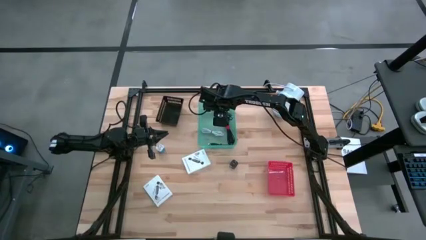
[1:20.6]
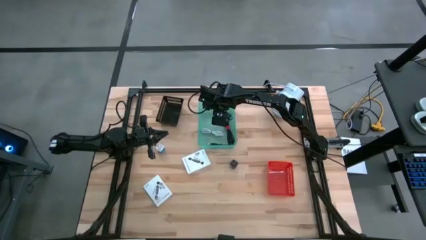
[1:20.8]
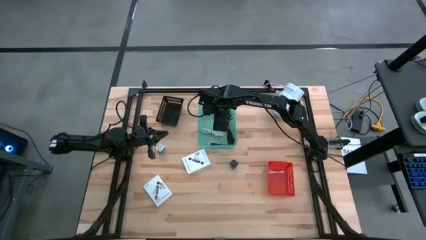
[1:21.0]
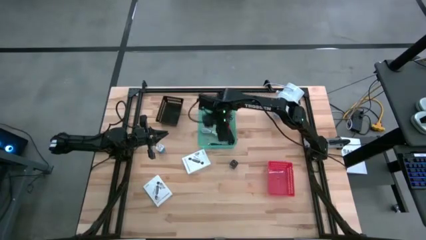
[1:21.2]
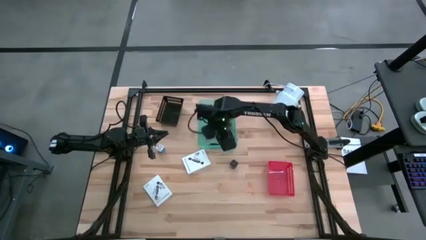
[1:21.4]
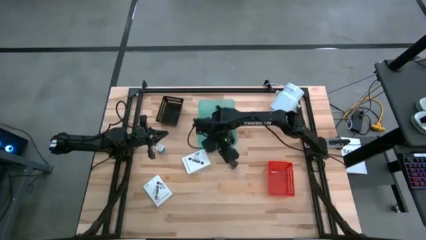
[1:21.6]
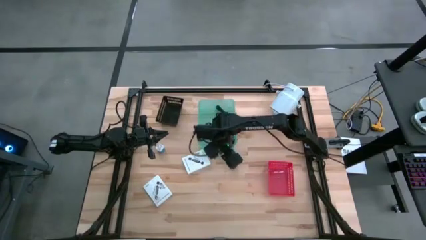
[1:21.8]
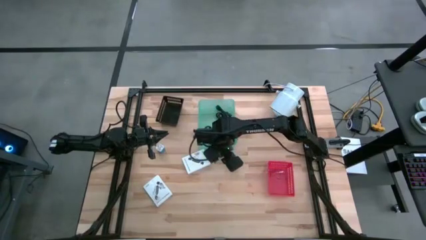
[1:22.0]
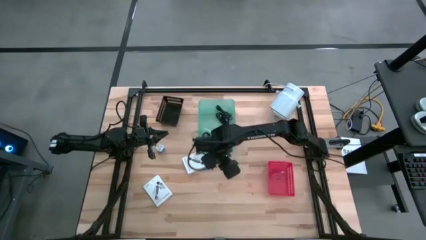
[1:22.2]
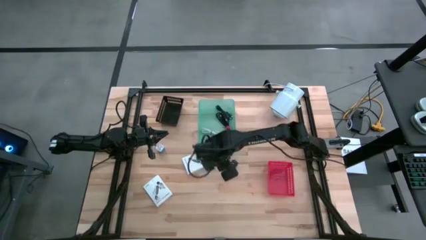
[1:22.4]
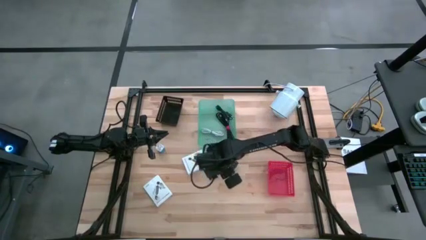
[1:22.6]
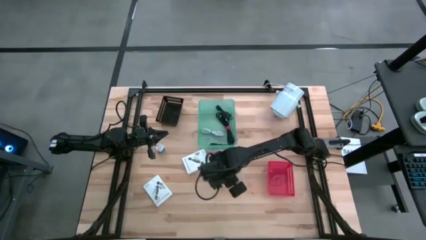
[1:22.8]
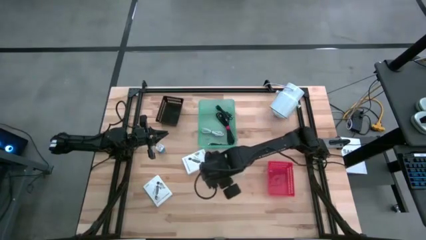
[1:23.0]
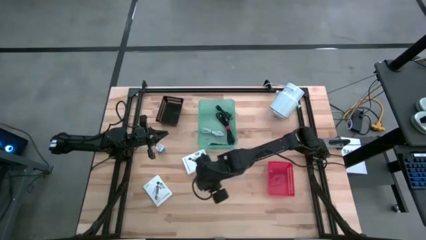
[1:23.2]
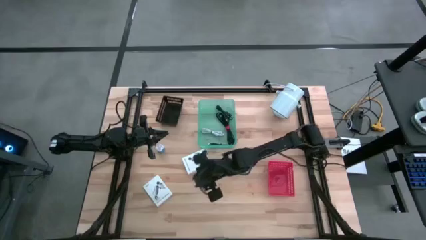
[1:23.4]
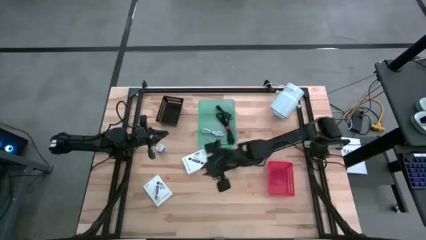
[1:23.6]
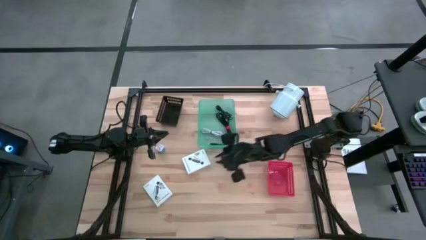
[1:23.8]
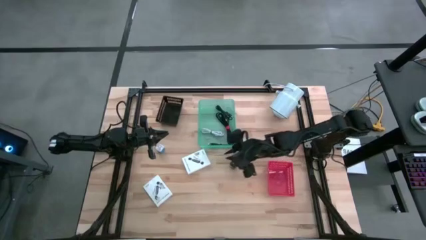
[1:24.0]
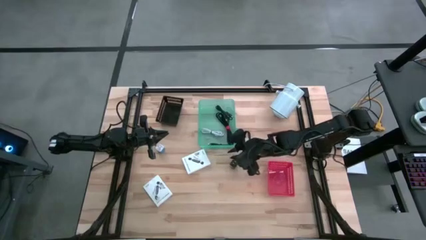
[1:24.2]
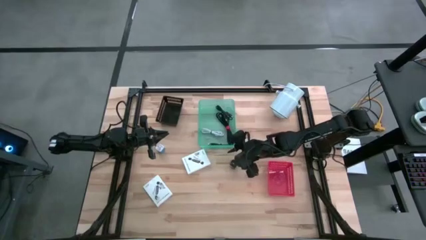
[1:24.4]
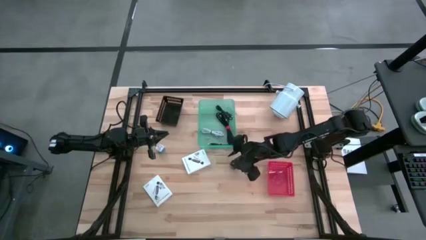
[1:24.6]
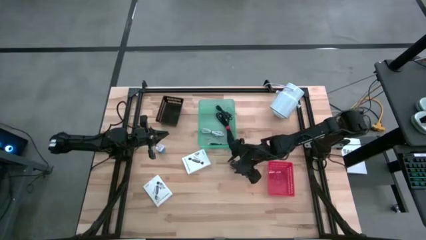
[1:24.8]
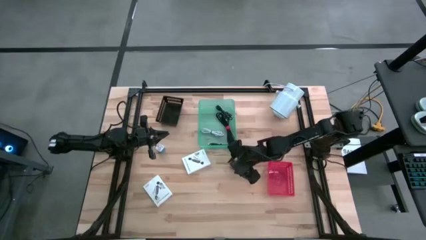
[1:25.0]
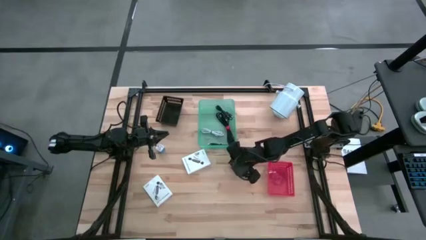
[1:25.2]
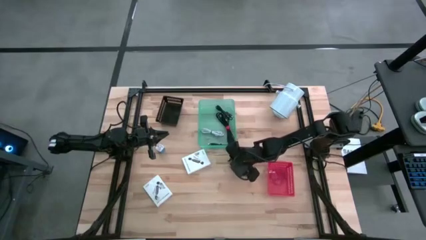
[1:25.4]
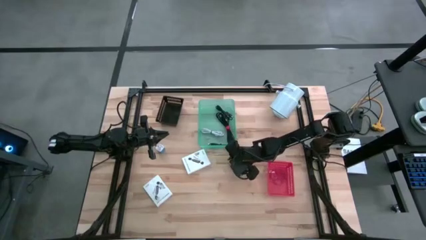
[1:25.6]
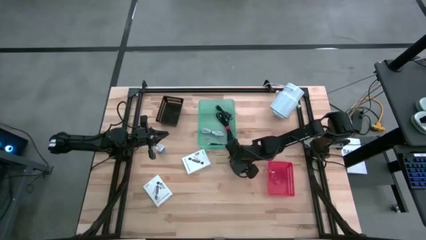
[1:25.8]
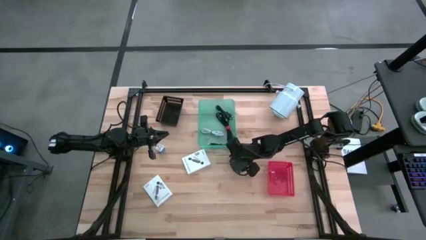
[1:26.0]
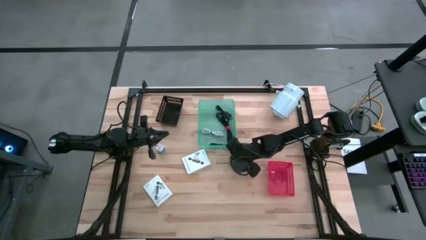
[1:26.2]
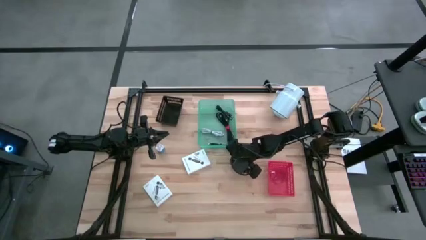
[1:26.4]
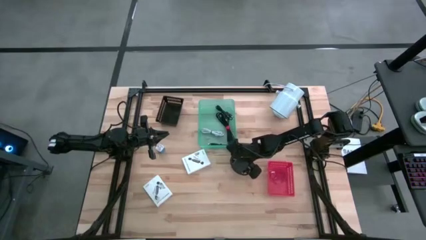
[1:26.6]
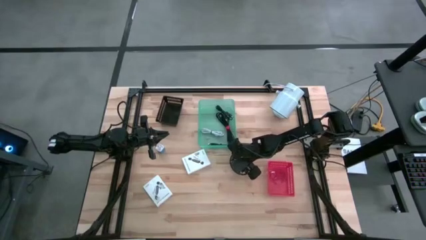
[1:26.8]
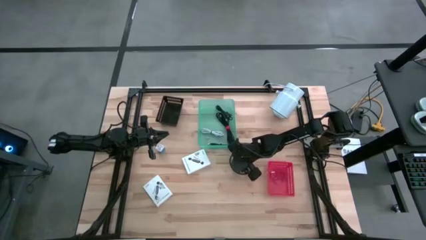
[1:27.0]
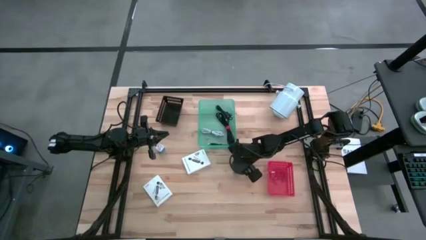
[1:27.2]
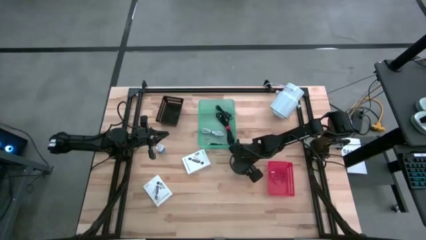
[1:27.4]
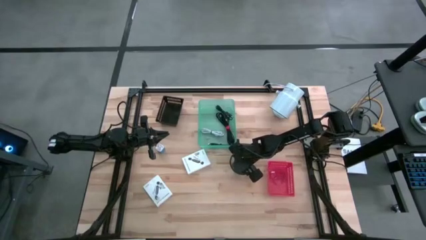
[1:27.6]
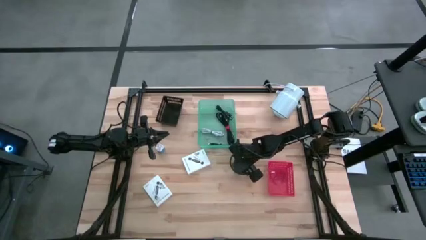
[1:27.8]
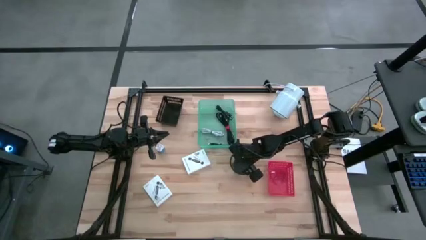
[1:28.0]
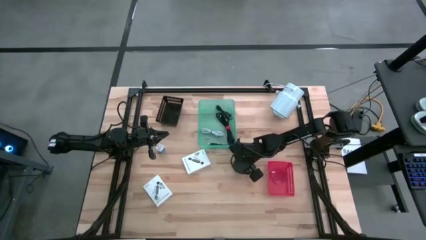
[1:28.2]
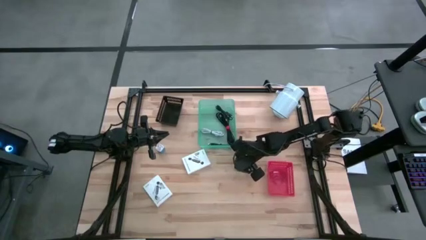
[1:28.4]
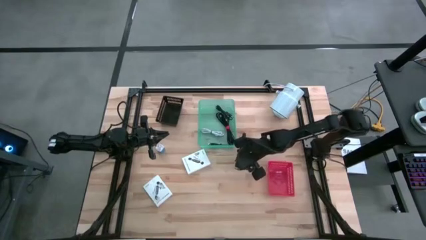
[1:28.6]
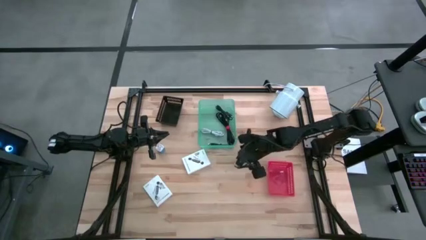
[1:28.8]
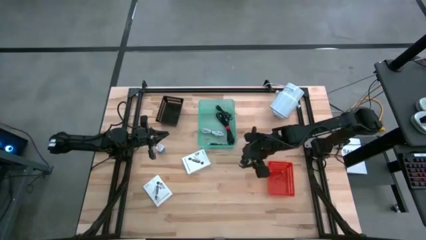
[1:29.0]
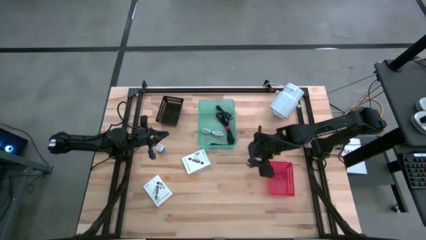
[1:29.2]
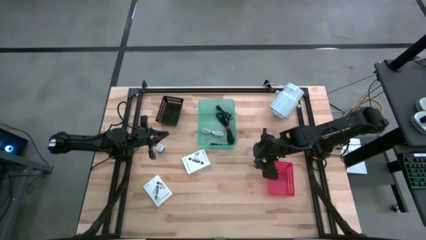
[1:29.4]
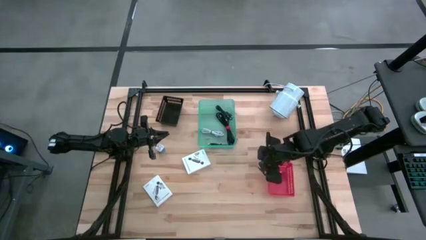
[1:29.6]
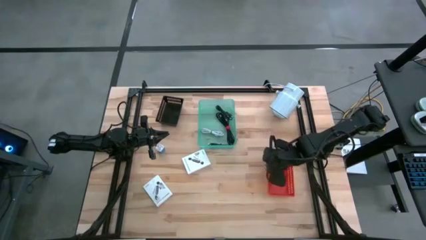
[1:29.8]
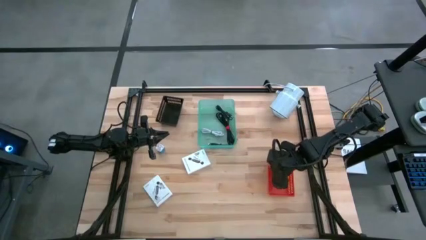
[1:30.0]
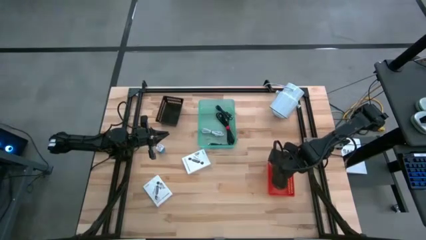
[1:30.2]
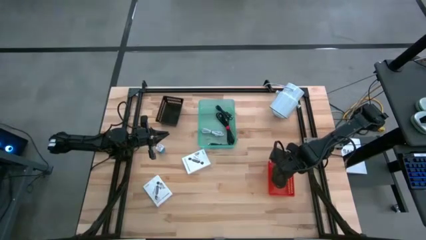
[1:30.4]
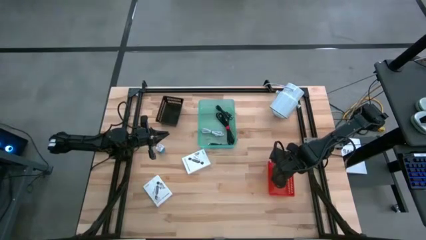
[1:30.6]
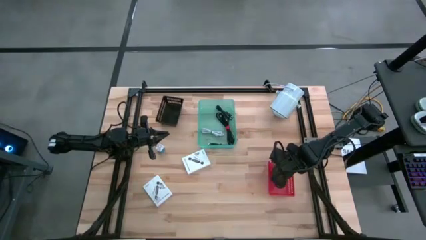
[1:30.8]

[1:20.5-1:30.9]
Task: Pick and place items into bin
Put the black charger adapter into the red bin

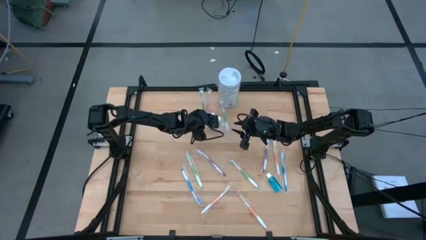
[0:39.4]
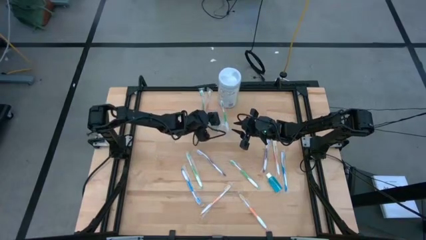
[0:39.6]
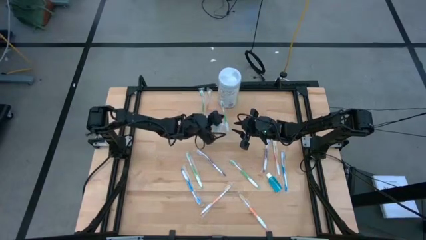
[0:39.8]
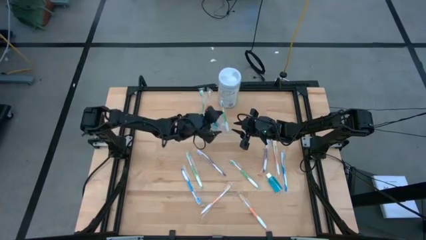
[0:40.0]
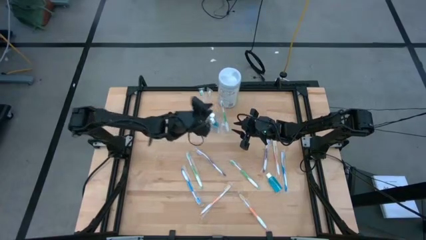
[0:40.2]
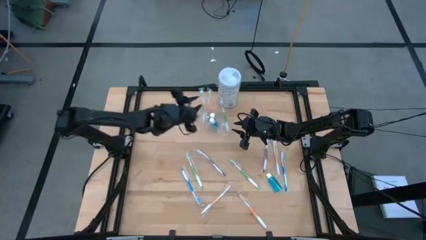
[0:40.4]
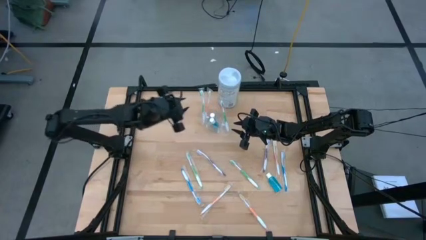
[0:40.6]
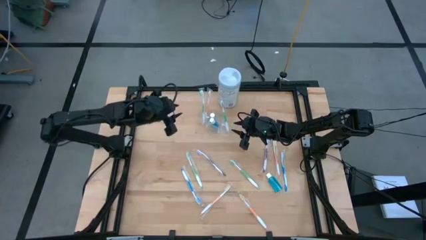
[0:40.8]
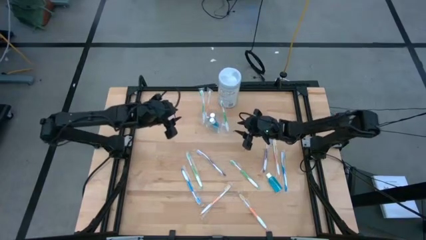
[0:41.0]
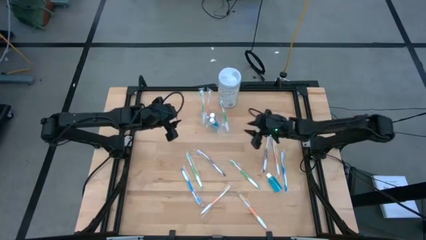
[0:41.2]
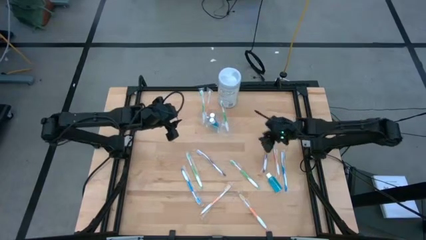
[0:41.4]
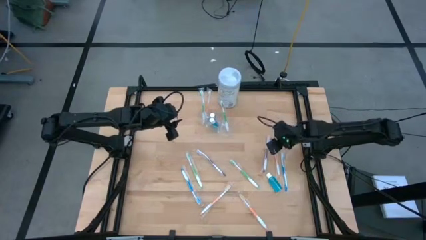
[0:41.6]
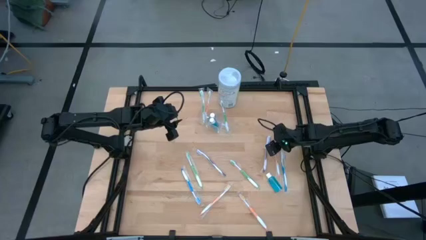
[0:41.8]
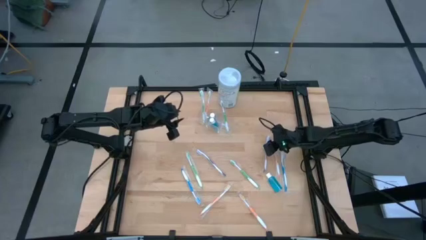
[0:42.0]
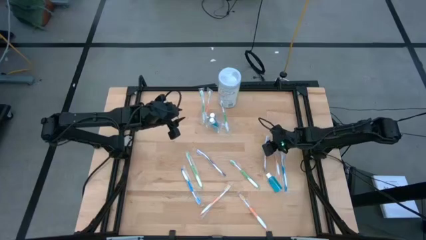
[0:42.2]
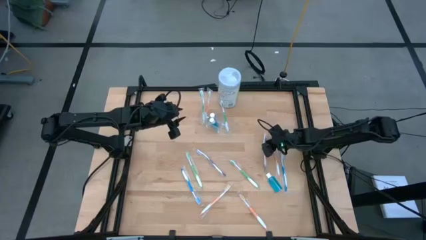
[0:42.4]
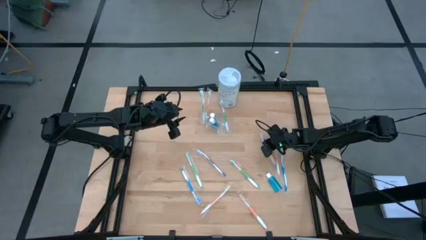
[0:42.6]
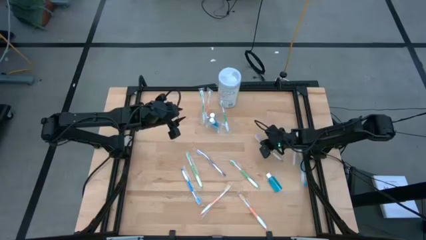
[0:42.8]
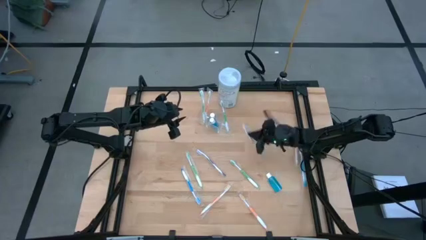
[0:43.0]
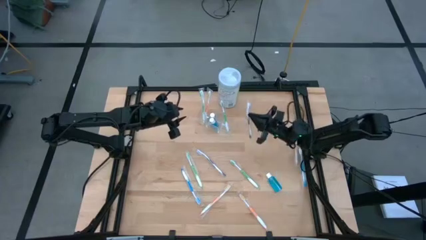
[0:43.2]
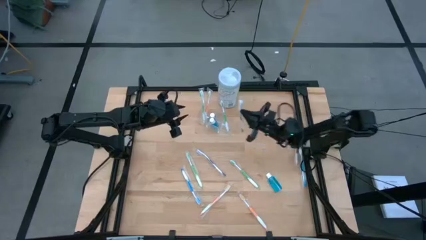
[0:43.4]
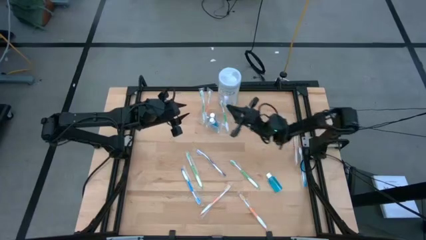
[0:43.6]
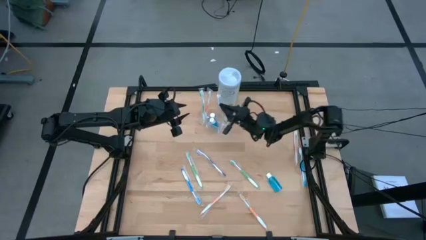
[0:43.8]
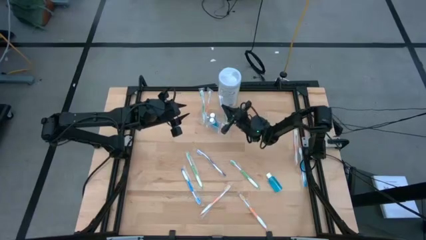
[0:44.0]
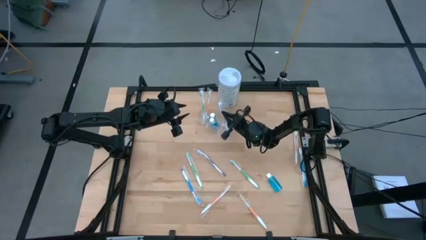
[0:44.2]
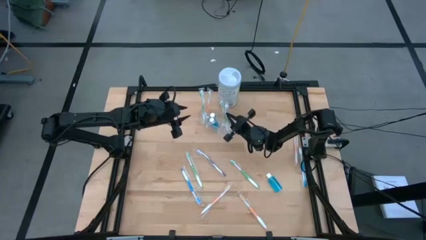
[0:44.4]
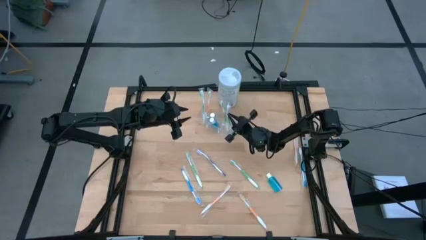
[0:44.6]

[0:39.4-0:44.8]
Task: Pick & Place toothbrushing station
Put the right violet toothbrush into the transparent organizer
